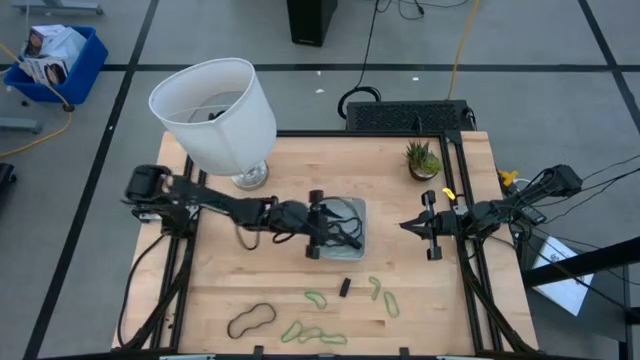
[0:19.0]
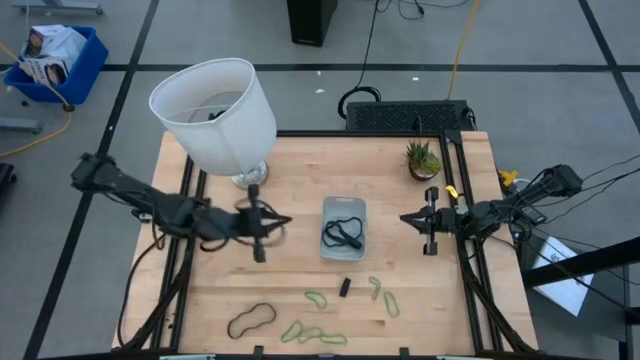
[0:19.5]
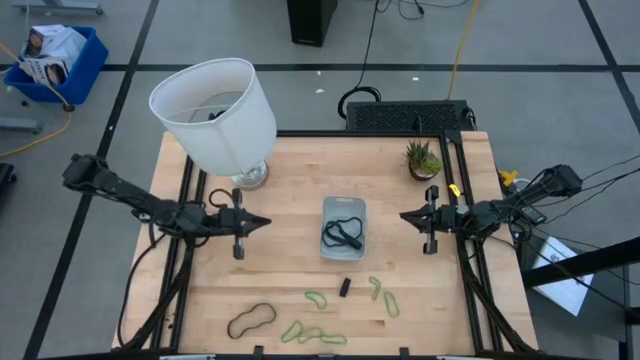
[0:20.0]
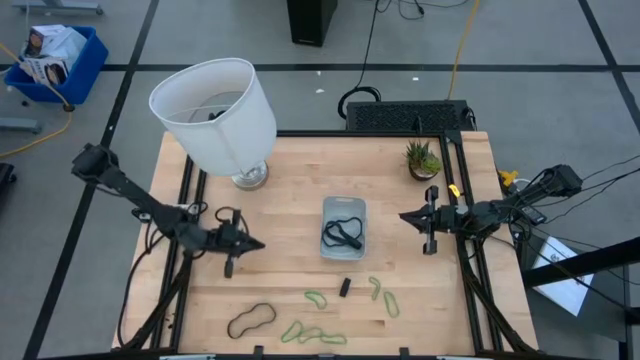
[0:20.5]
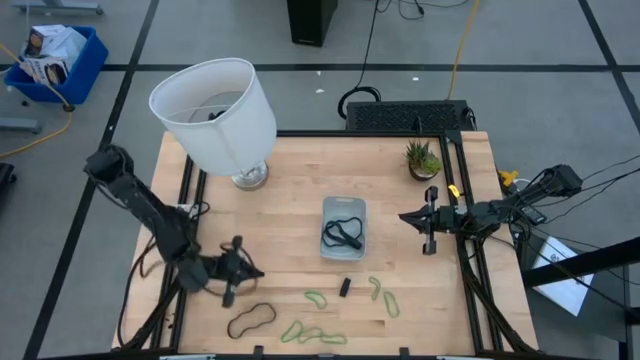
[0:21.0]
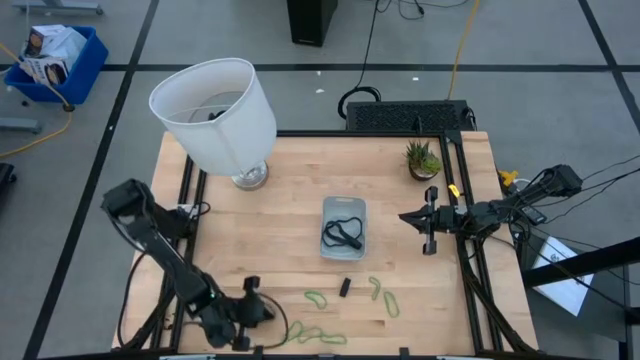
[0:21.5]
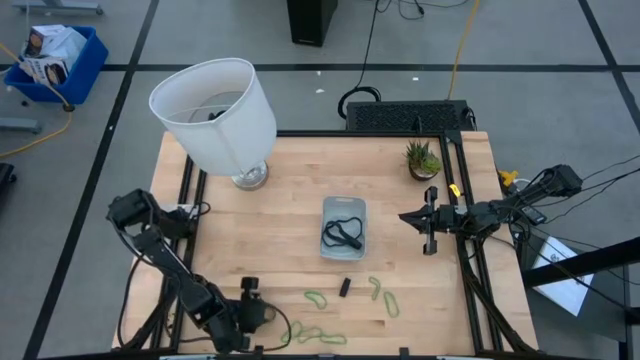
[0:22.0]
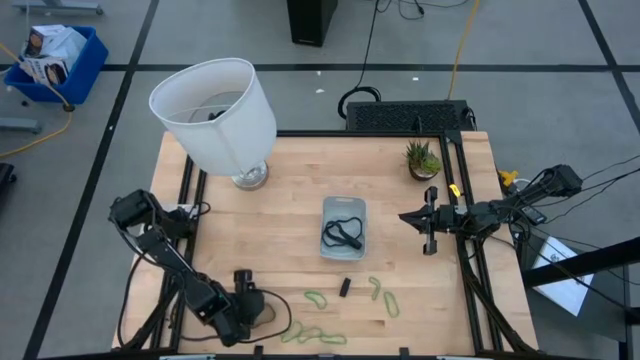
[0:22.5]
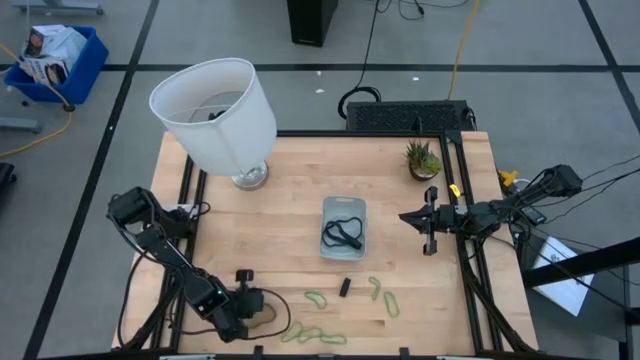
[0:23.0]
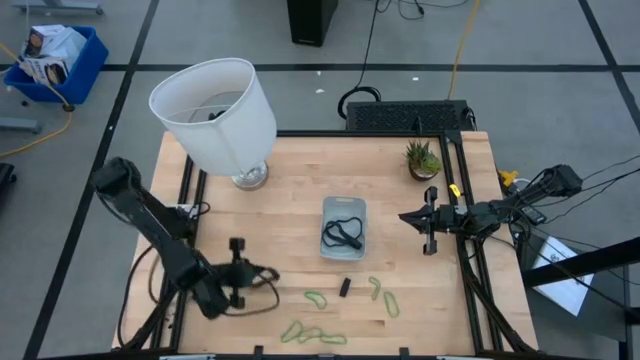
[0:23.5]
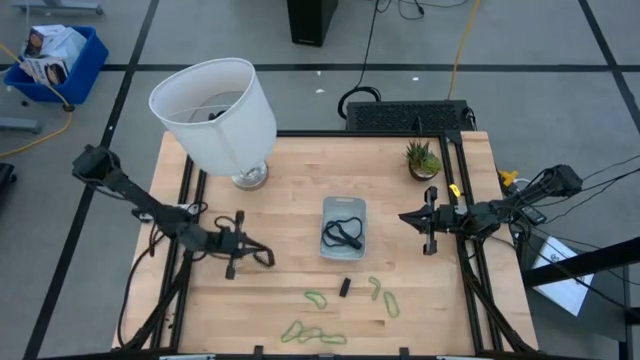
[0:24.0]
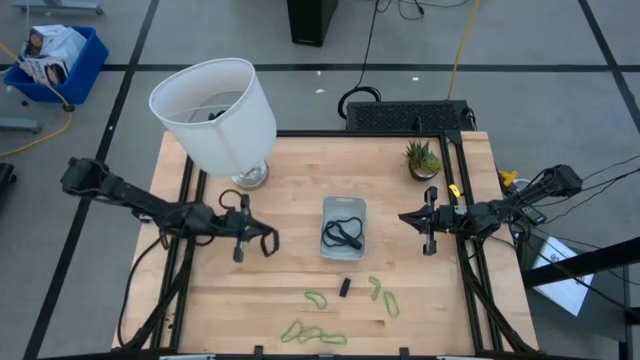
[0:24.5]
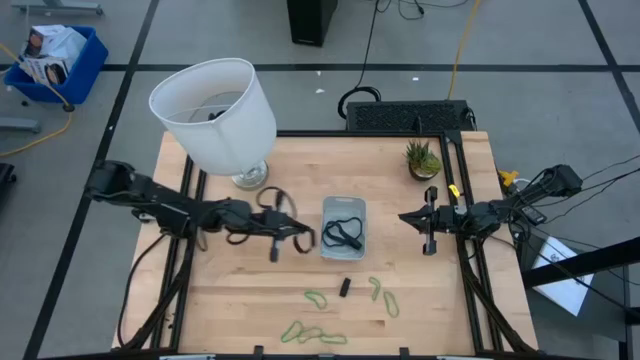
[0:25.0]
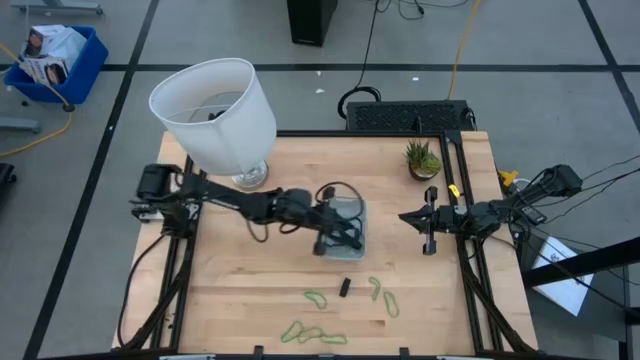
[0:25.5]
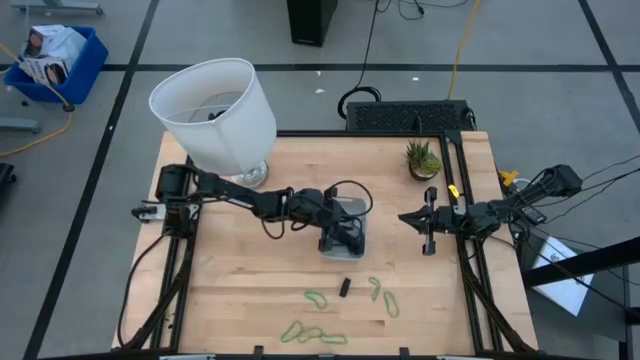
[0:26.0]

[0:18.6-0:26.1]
Task: Pick and place rubber bands into bin
Put the black rubber band into the gray container

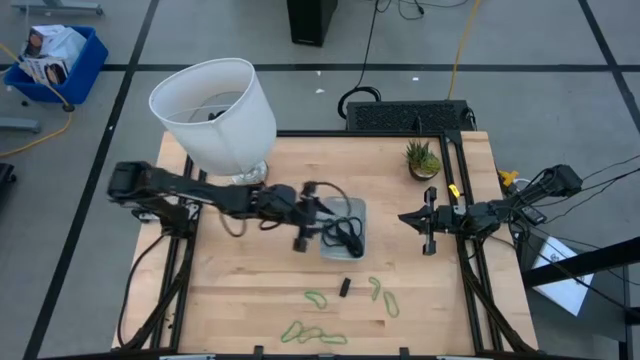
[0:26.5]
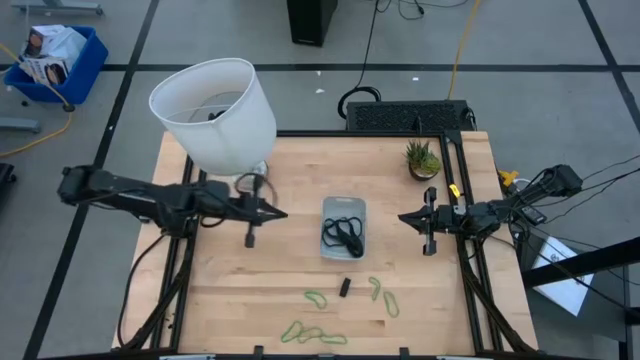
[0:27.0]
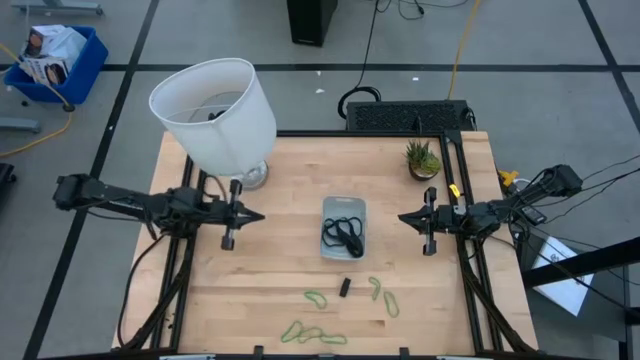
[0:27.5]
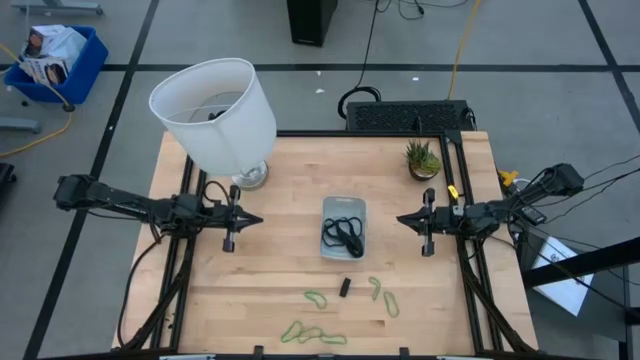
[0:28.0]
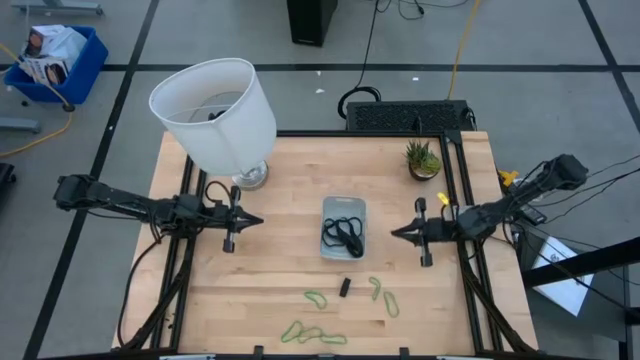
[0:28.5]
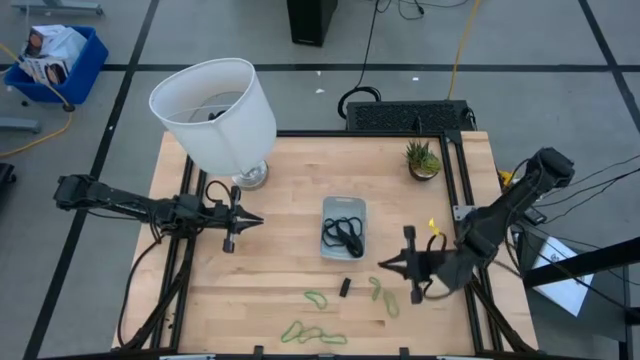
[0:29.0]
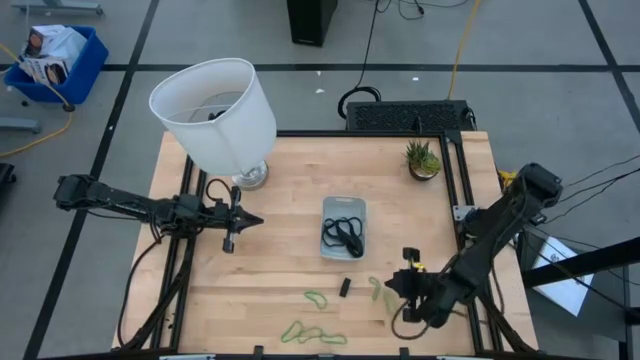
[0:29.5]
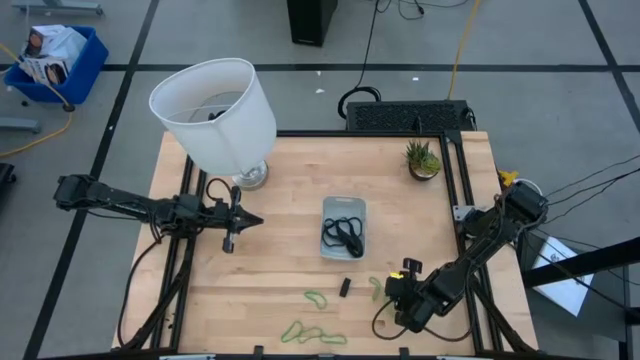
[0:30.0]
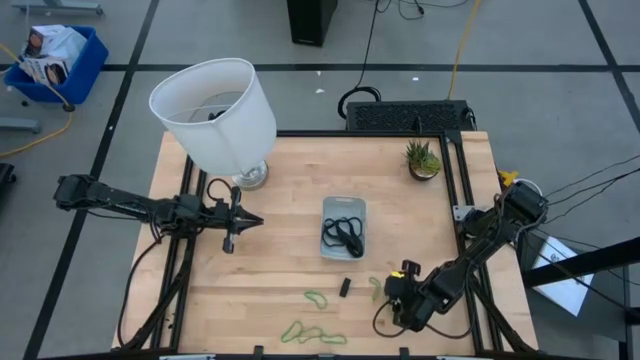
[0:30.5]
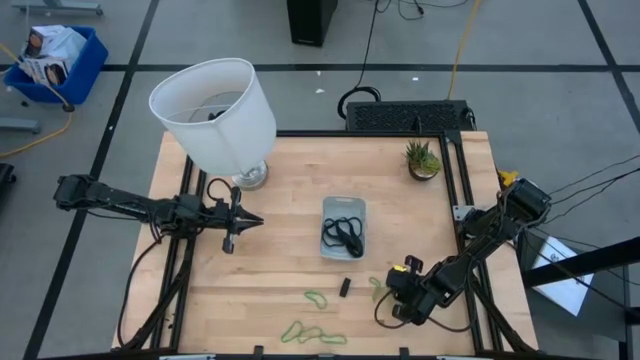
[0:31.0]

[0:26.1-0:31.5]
Put the green rubber band into the gray container

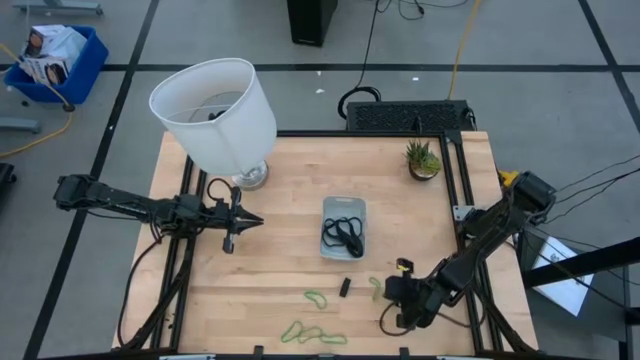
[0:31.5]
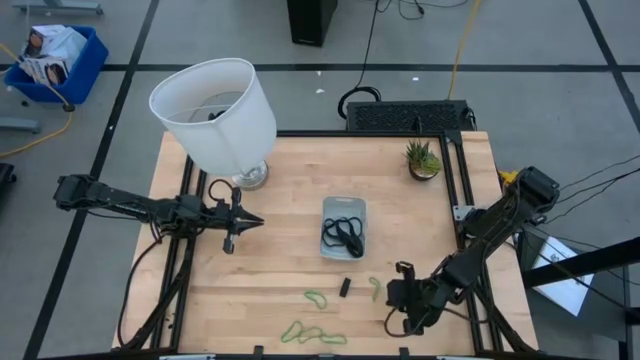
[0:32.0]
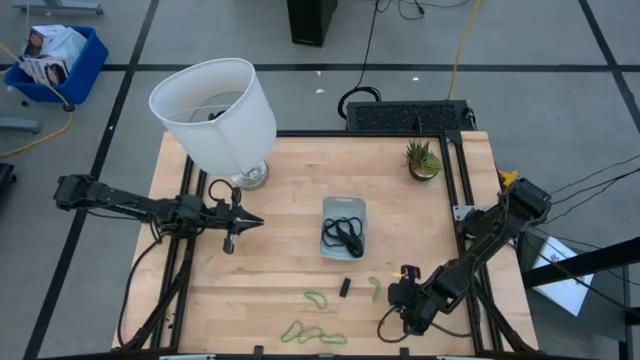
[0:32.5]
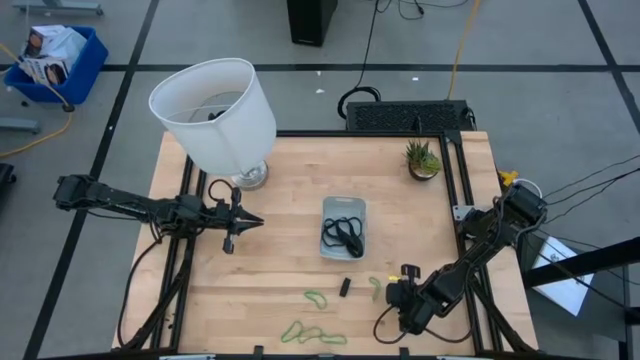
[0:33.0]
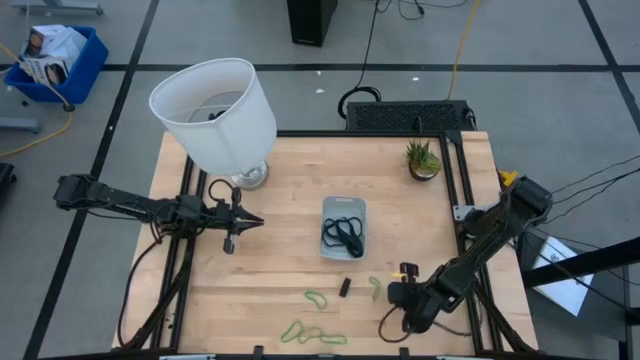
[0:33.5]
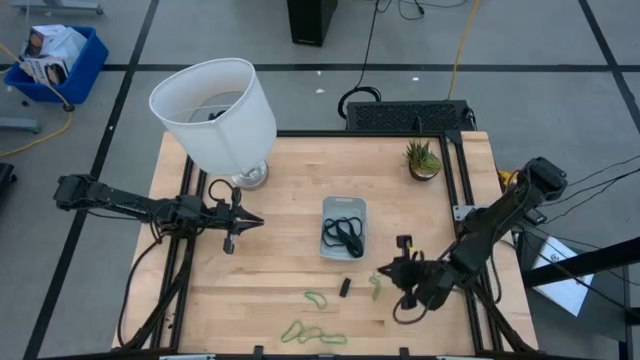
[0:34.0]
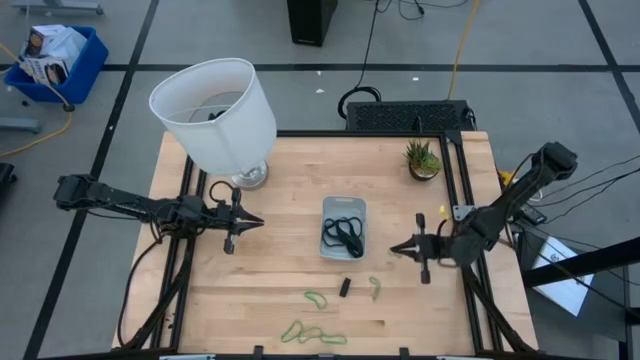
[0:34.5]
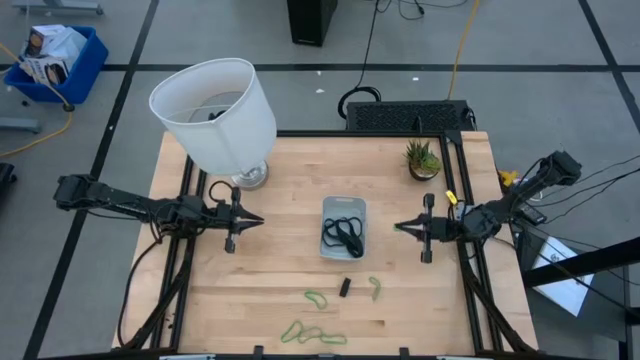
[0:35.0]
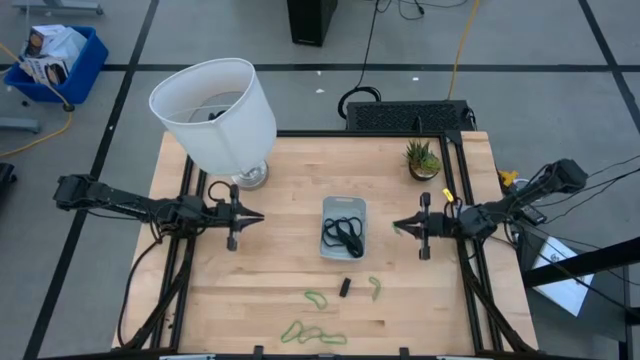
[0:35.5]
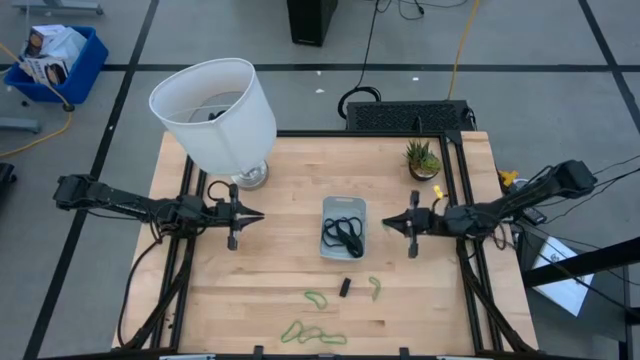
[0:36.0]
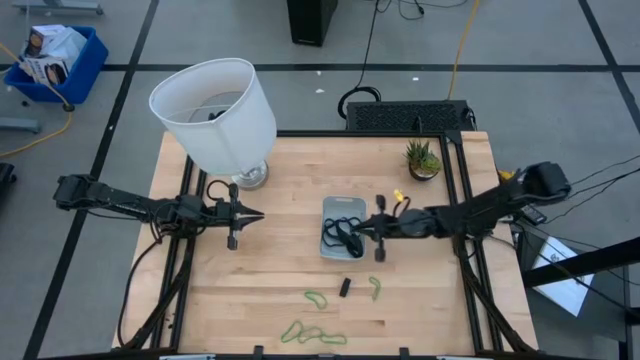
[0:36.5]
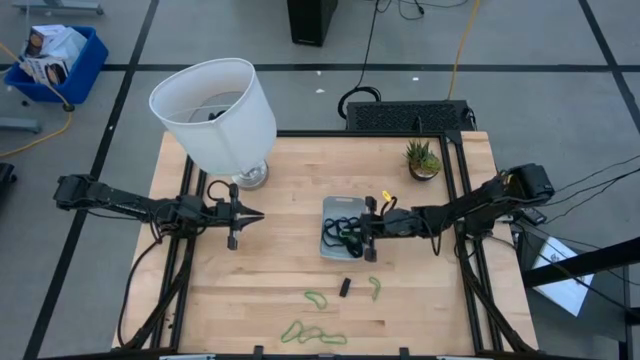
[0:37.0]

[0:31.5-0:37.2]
Put the green rubber band into the gray container

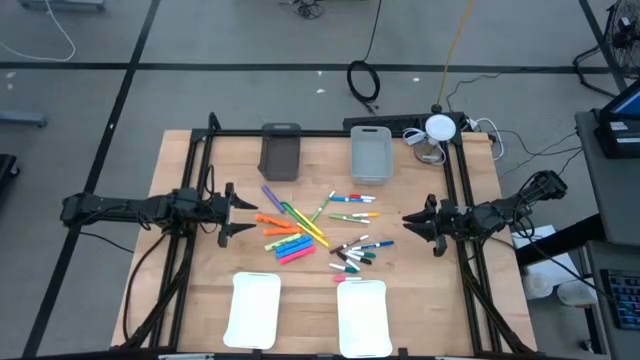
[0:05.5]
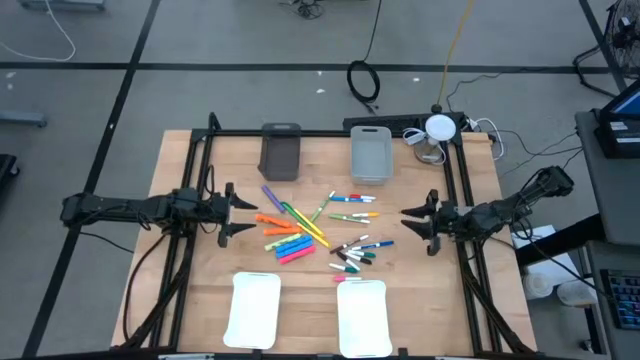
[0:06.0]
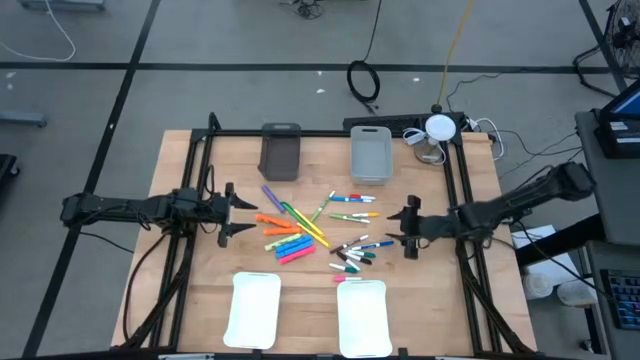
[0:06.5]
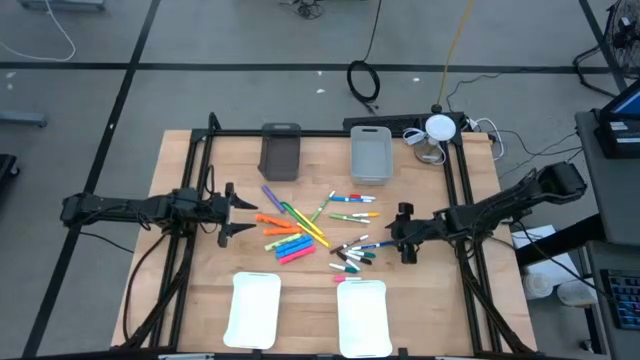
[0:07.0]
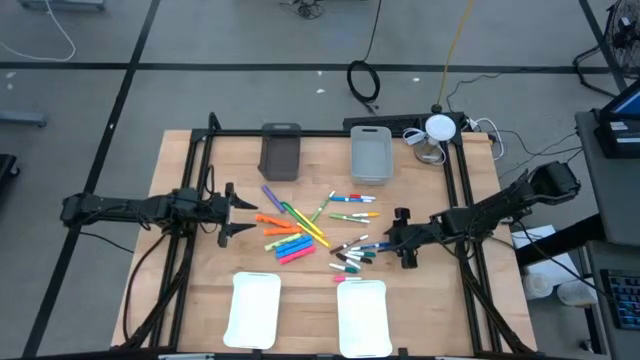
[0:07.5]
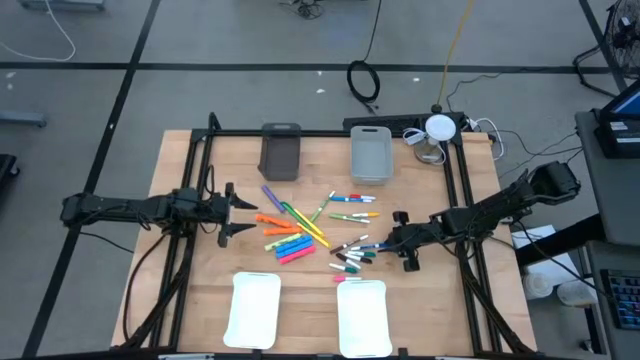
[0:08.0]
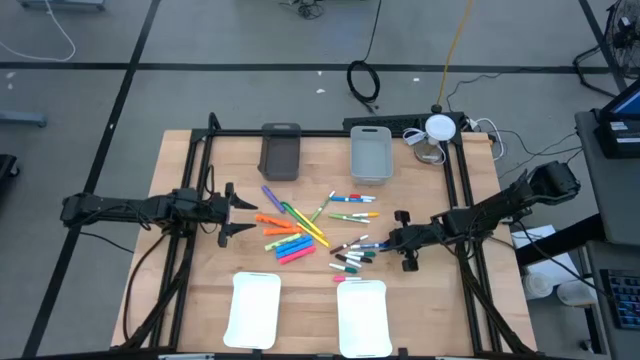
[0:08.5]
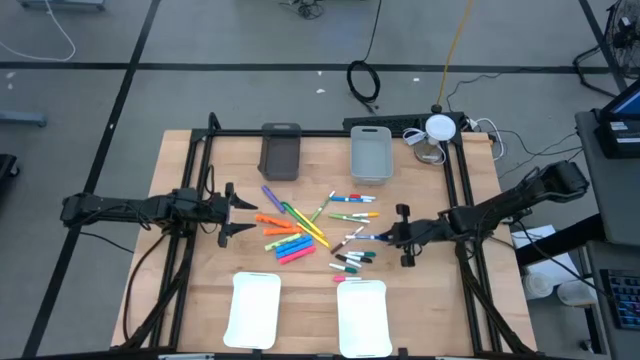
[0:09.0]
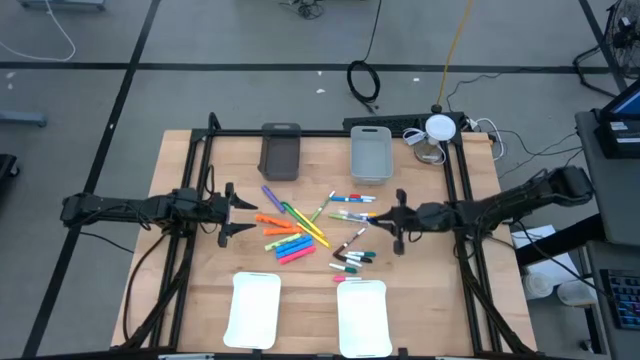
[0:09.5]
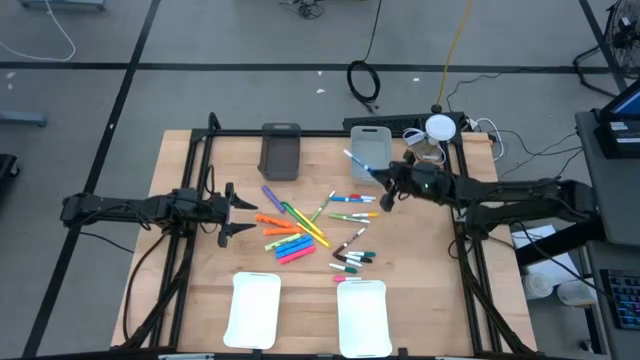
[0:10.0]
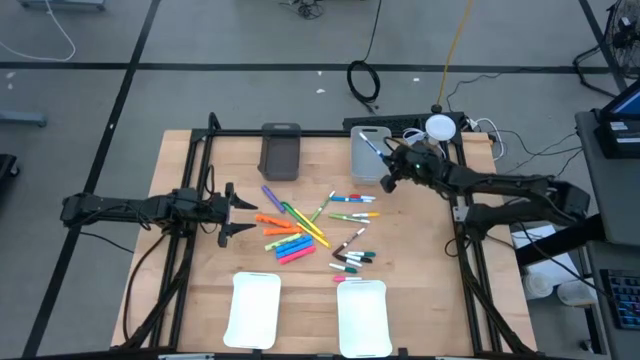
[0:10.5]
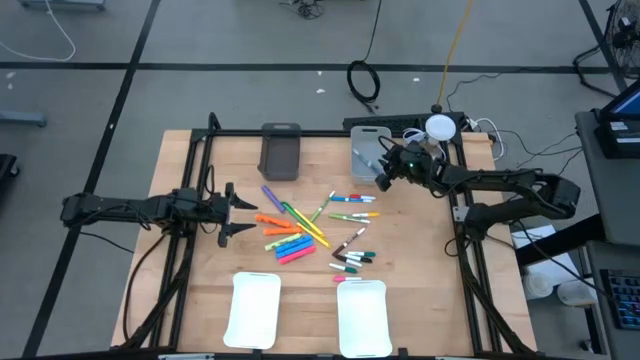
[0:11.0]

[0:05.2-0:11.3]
Task: Pick & Place Markers
Put the dark blue marker pen into the gray bin
